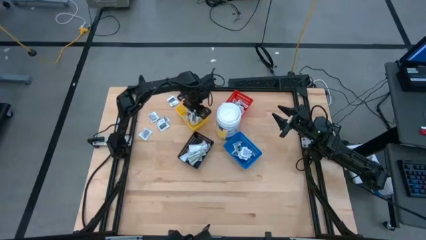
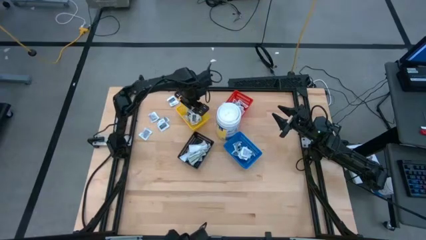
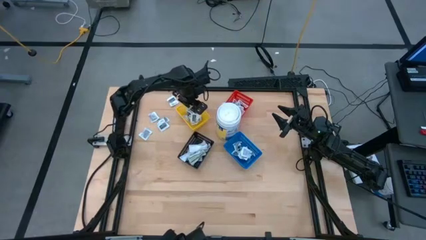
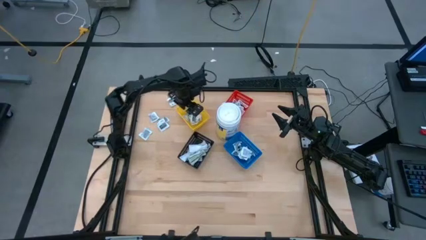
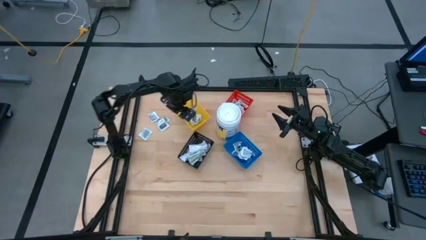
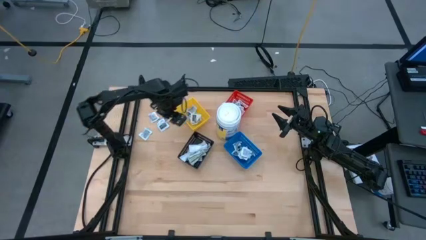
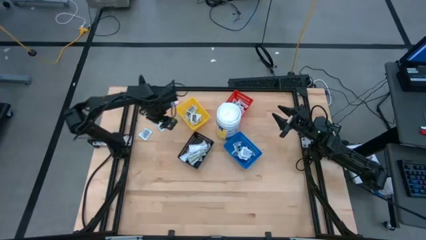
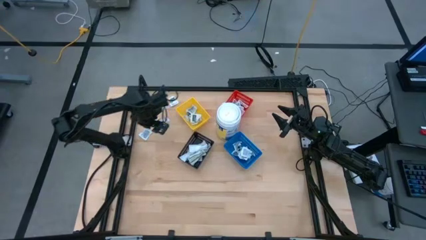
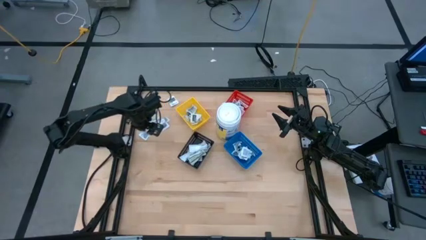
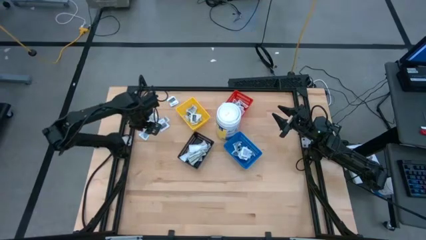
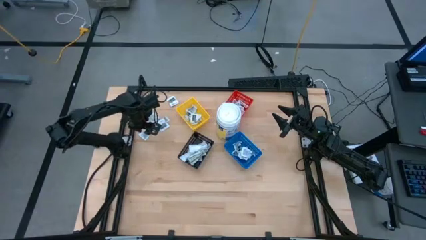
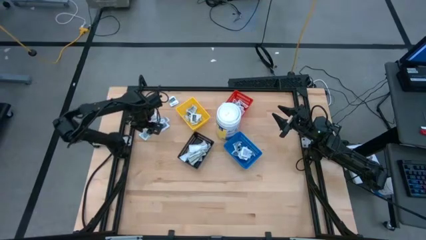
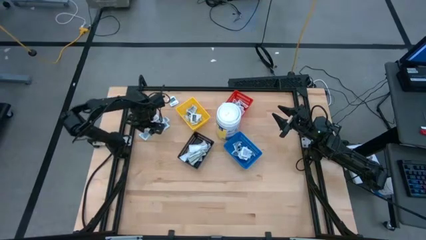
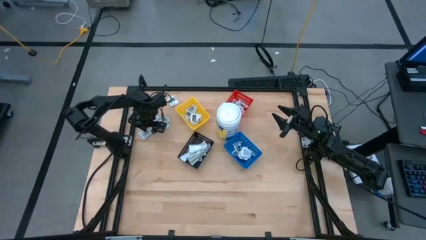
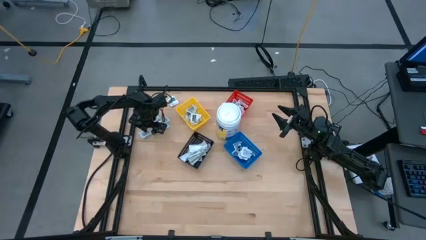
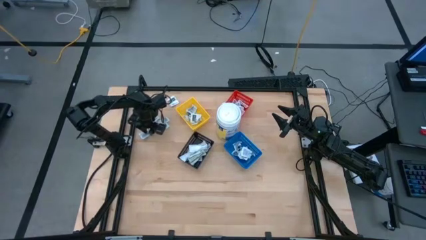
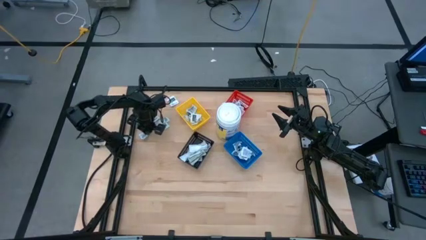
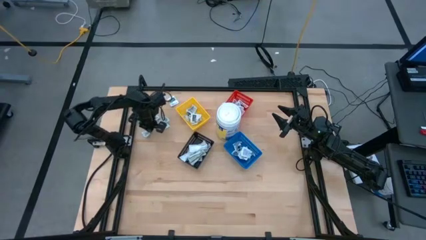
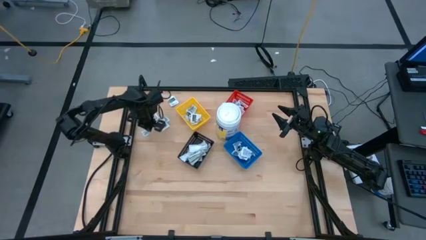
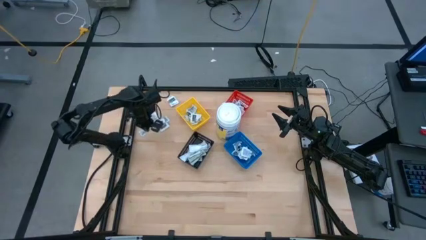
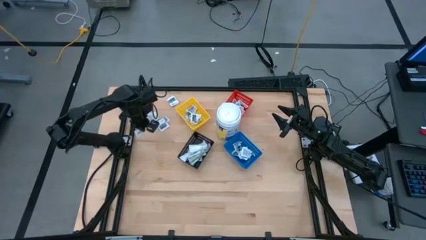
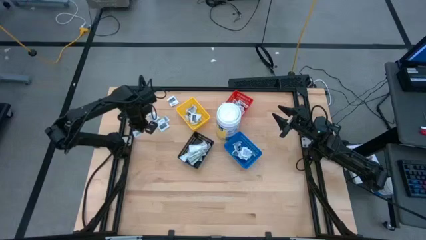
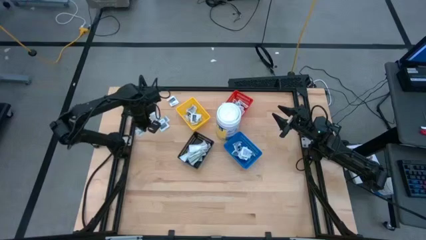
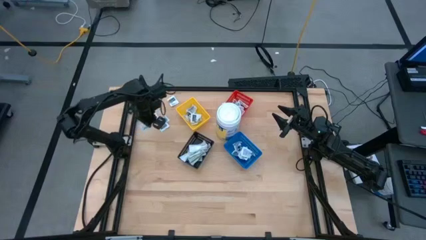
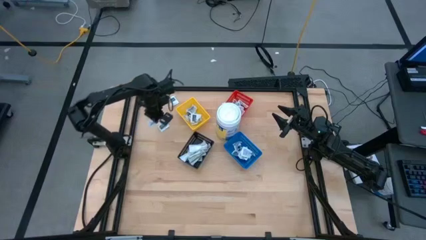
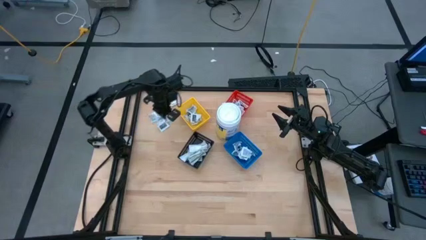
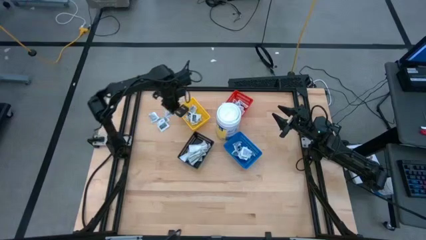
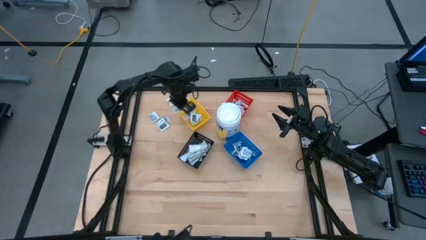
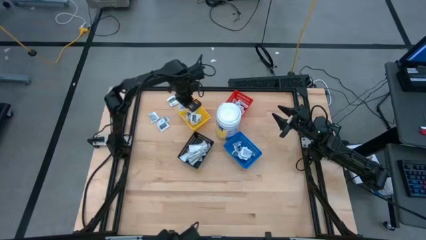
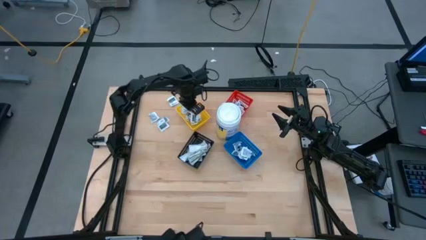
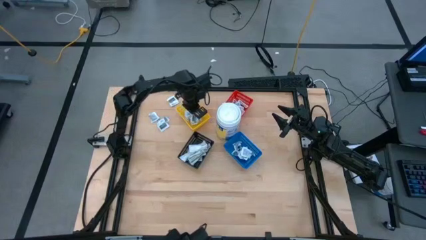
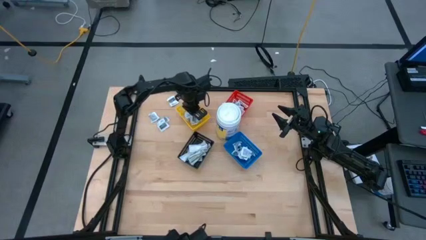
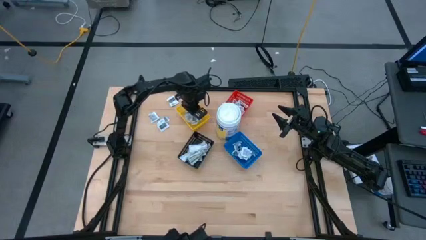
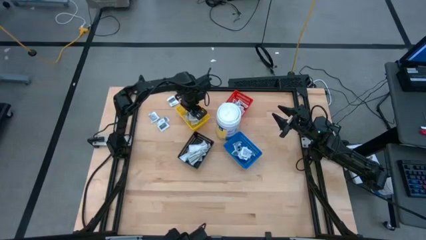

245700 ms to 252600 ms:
Task: Pick & Place First Aid Supplies
Put the towelette pack into the yellow bin

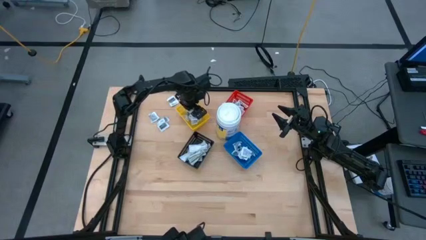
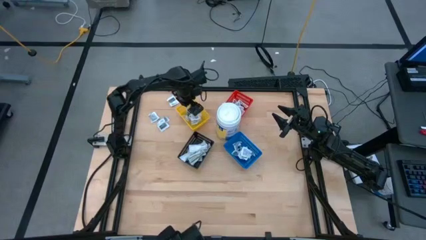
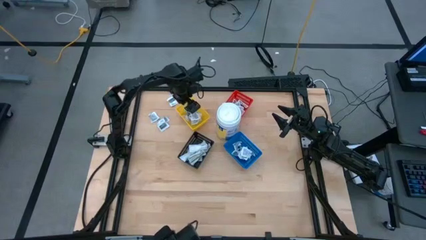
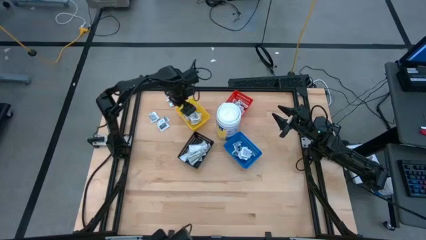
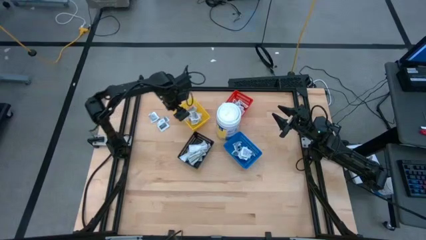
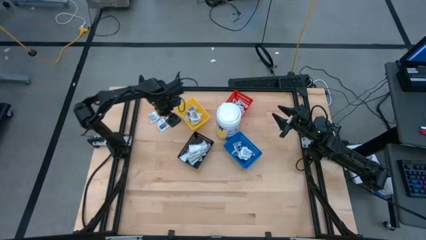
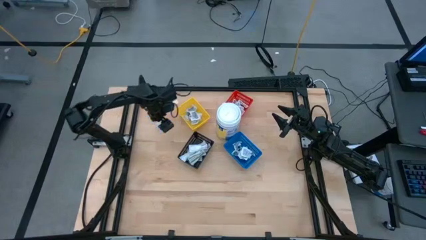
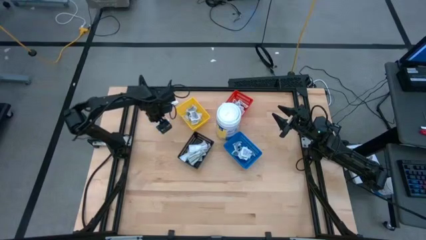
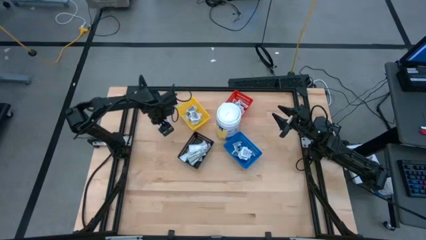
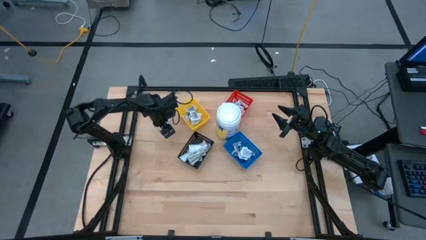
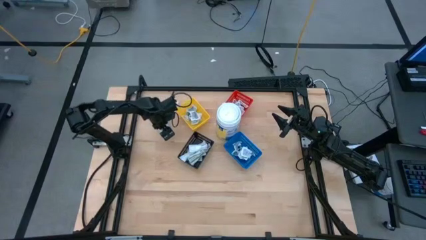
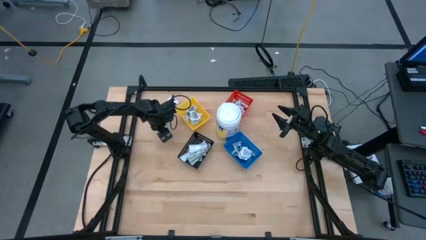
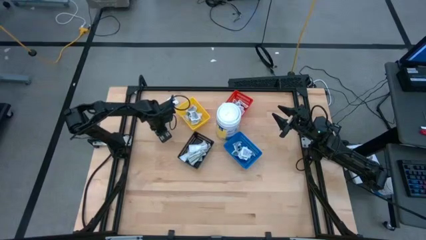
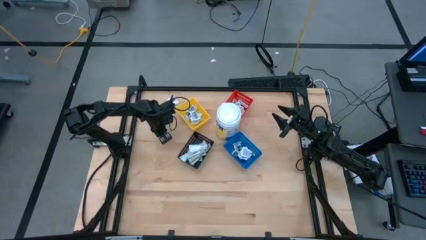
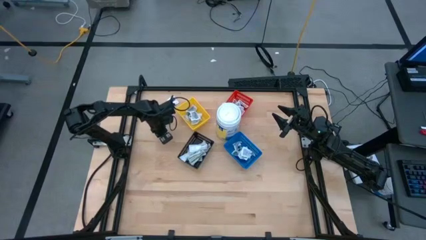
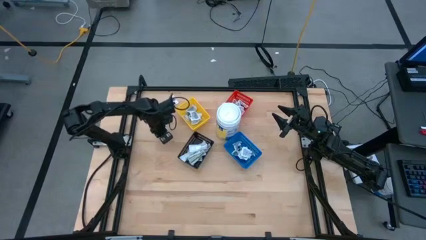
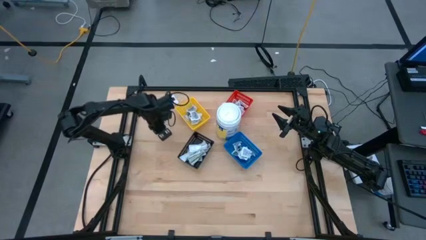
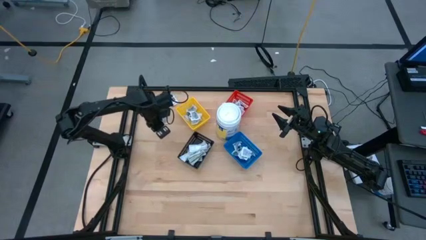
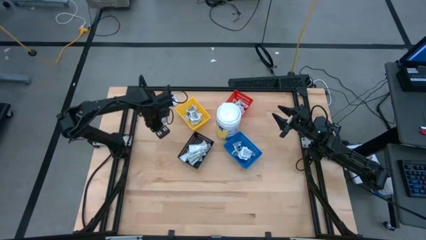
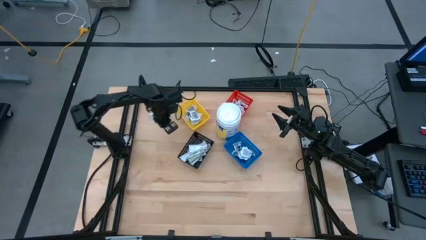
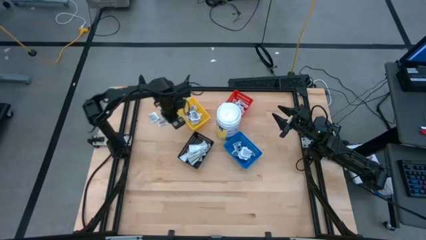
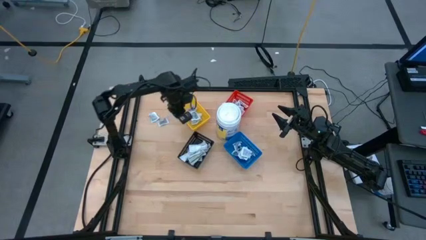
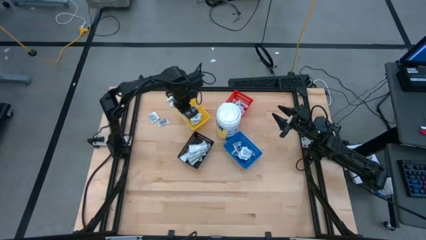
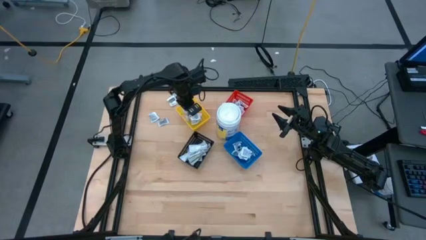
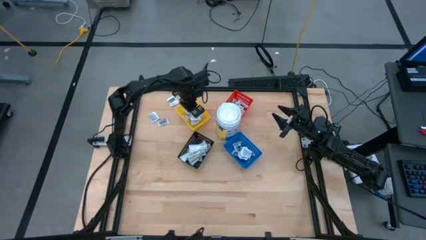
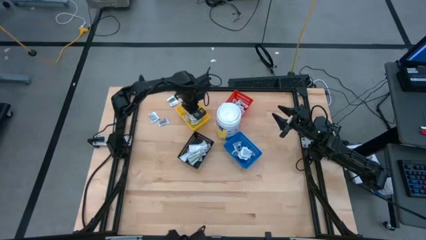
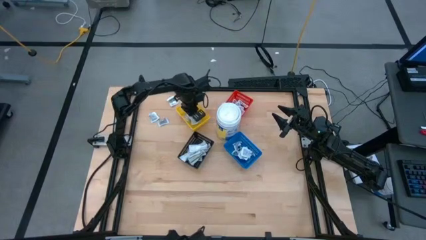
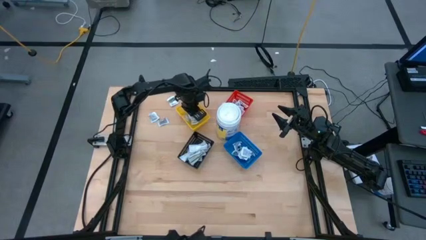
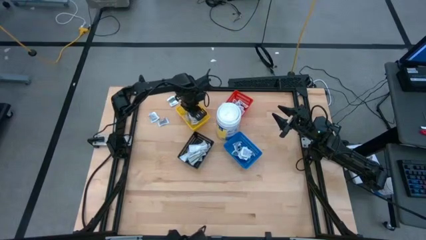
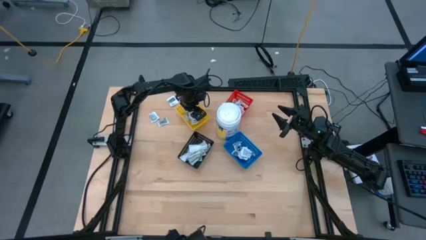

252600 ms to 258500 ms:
Put the towelette pack into the yellow bin

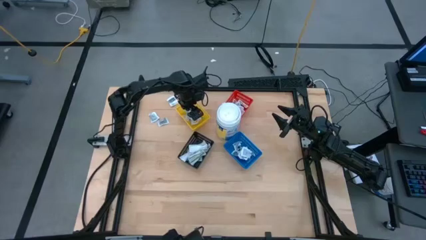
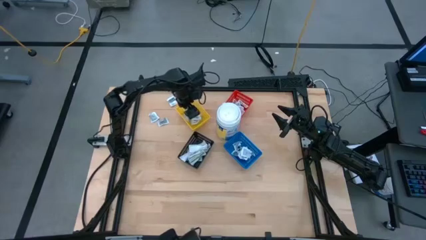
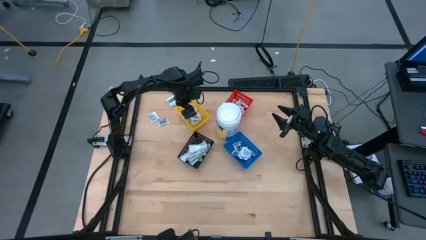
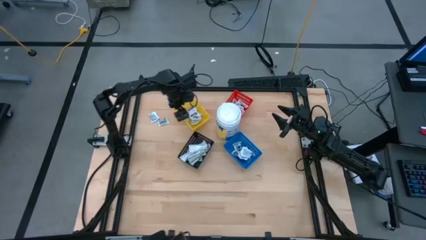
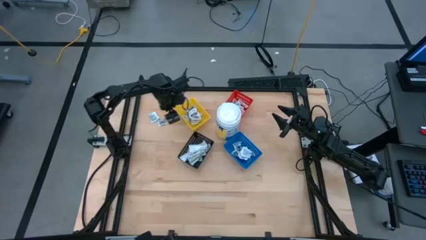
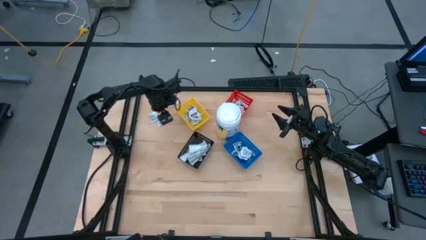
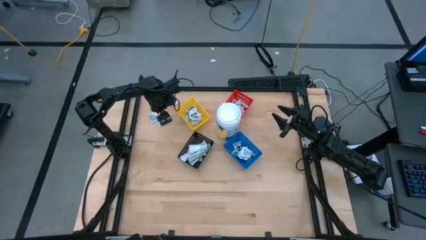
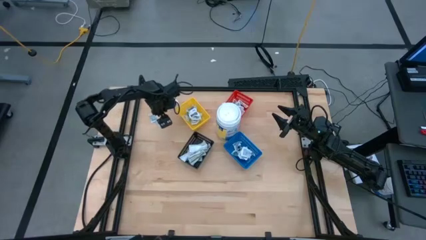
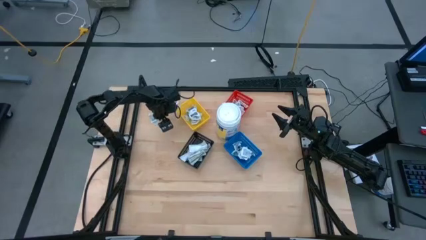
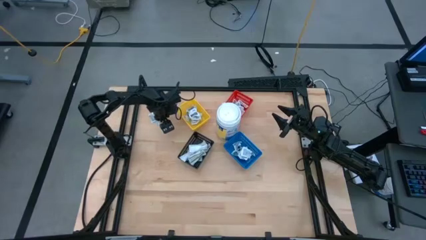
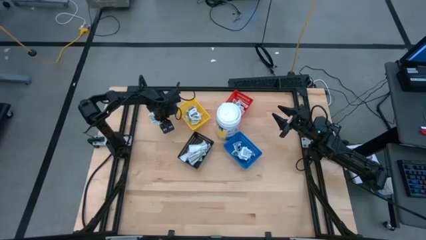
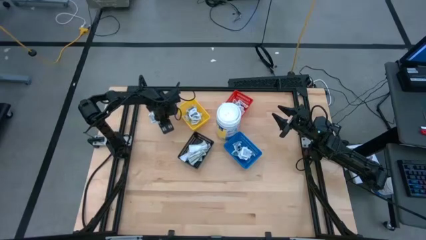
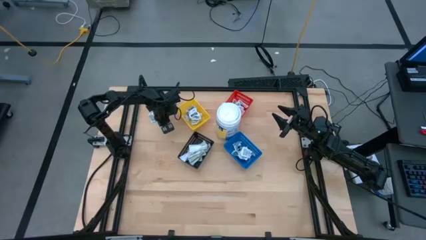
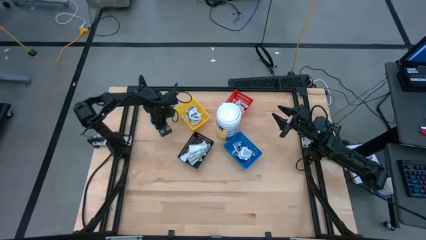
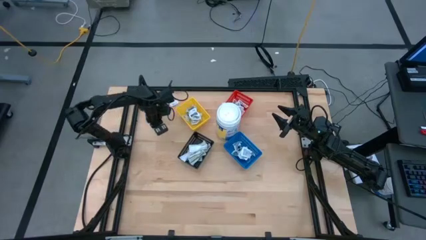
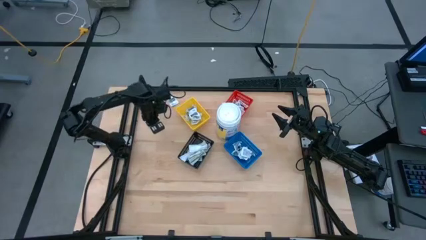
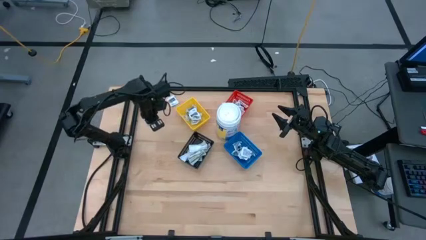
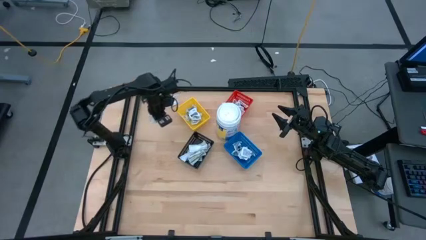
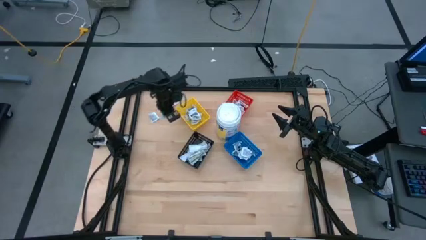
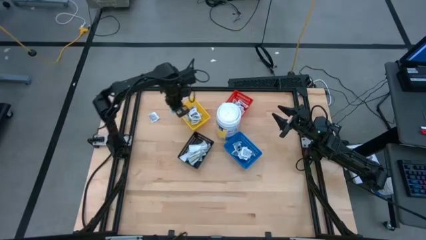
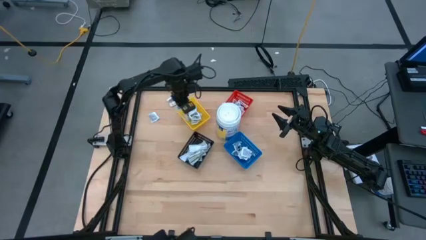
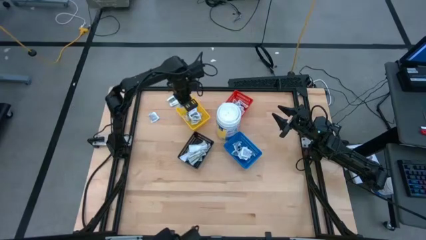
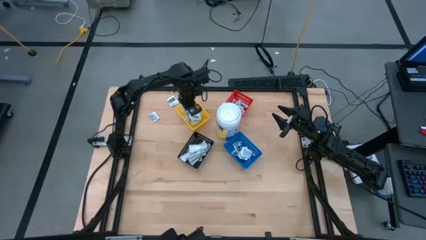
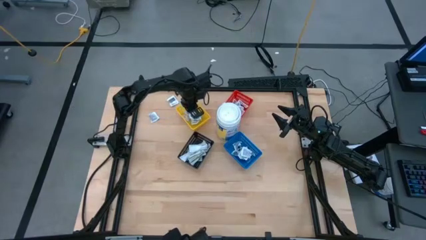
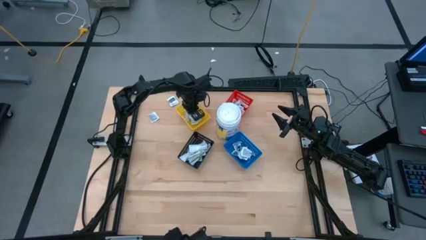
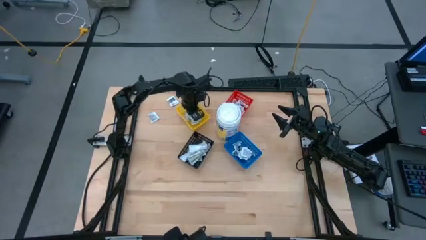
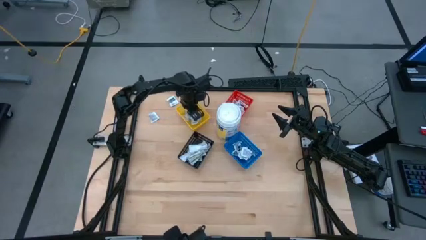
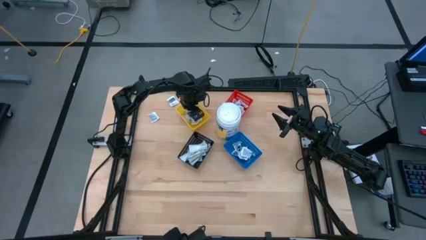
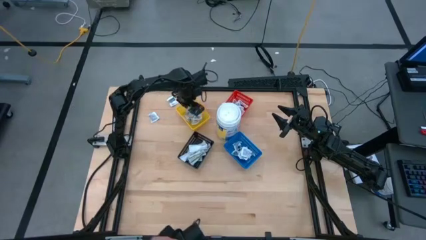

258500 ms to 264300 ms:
Put the towelette pack into the yellow bin
